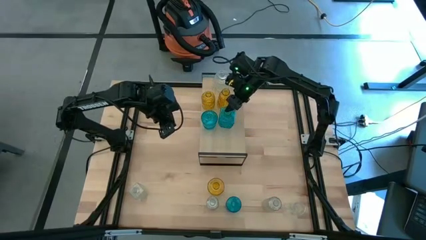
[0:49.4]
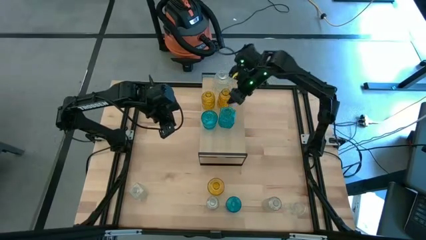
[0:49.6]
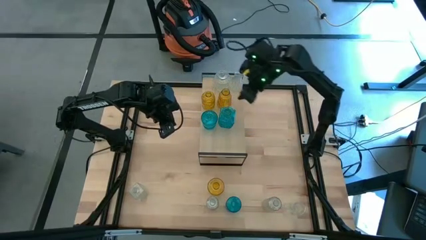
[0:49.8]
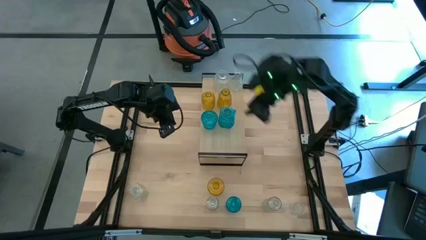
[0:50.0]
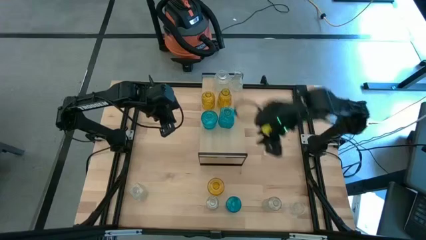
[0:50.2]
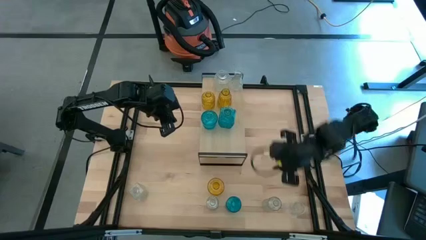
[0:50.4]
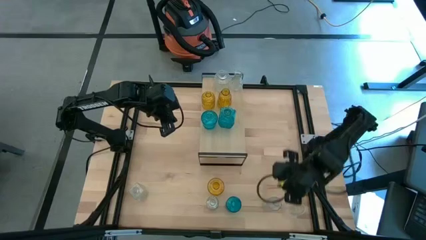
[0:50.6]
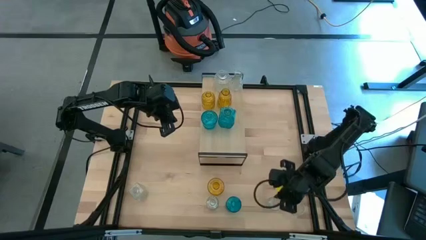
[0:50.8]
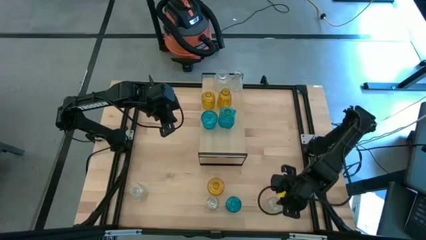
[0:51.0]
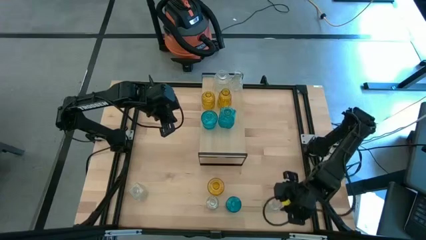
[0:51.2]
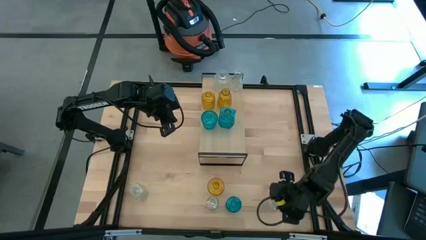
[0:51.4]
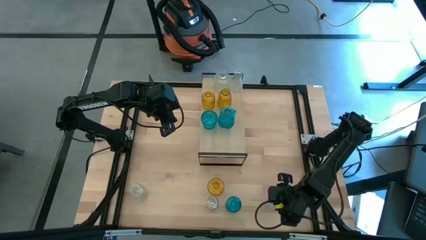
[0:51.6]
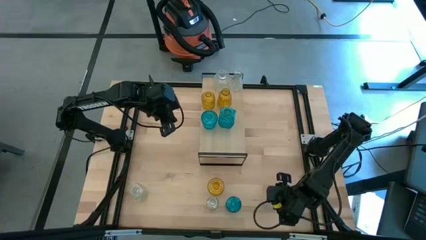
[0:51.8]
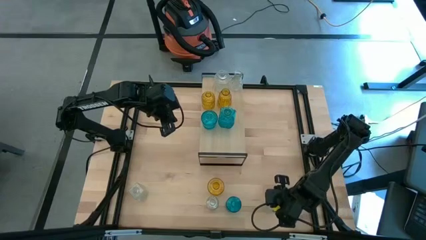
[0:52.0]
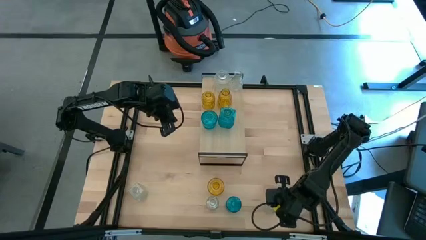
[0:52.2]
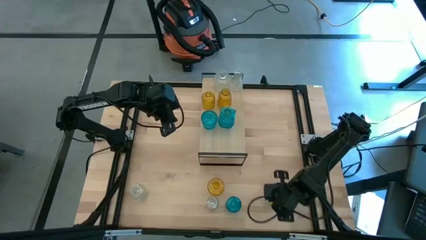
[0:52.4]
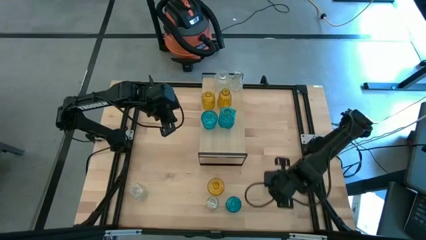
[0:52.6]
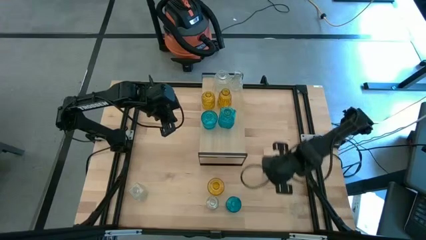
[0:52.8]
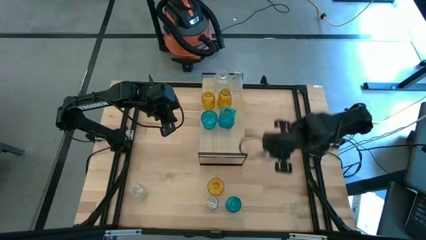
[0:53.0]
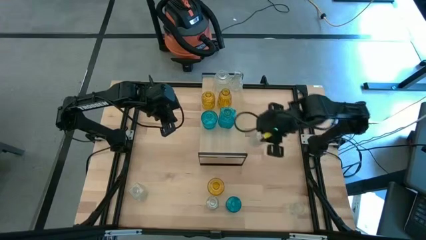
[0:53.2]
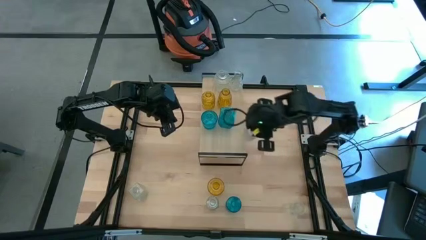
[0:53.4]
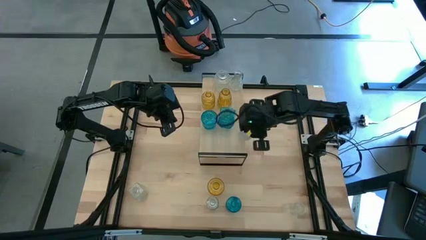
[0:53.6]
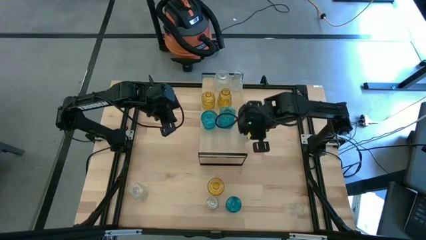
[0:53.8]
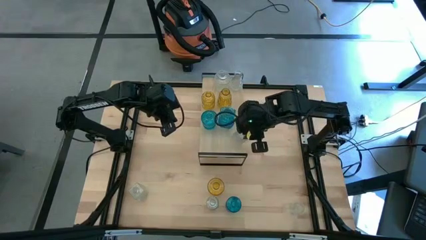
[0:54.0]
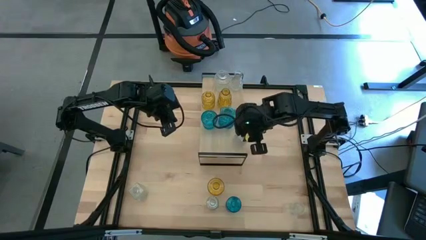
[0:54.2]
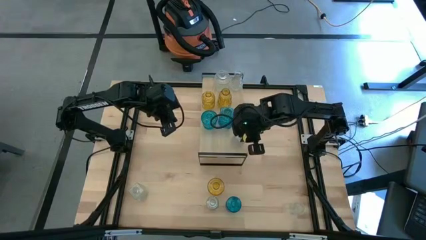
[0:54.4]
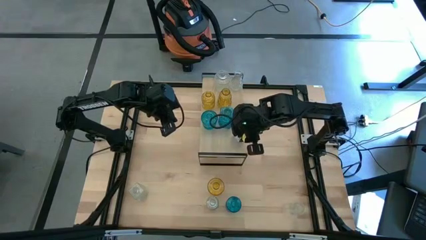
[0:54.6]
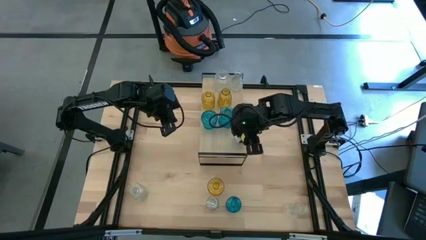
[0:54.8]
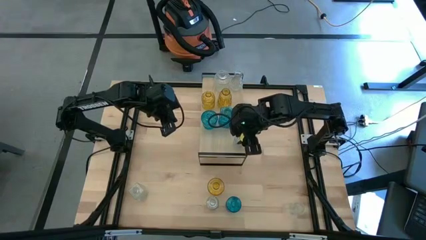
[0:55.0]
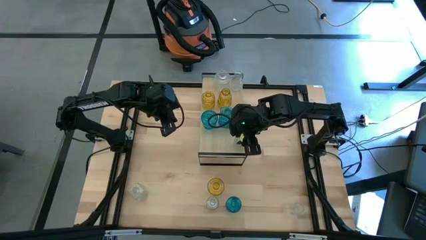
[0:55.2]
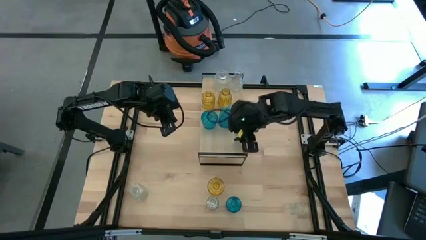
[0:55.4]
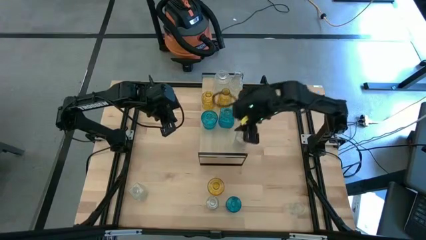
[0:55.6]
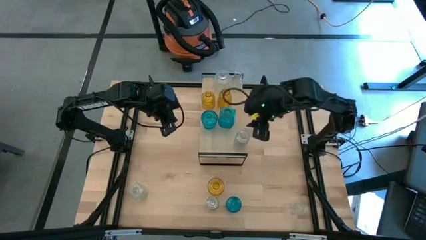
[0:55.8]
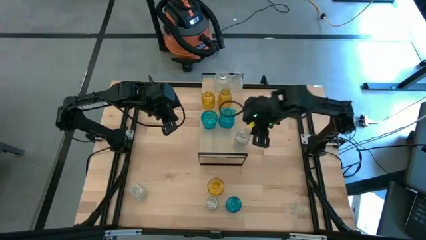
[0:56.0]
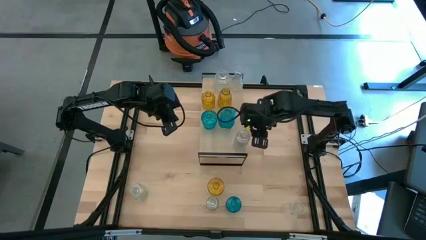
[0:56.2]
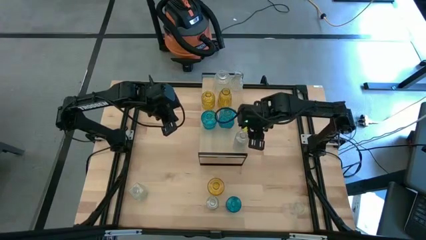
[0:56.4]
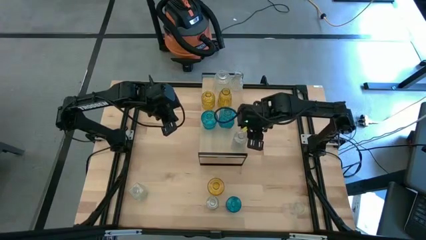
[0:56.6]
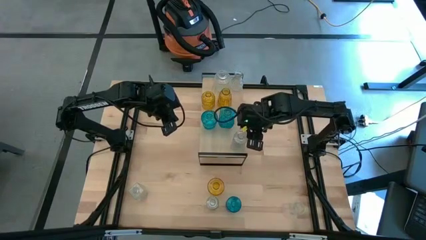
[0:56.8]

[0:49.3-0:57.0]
Task: sort vases onto shelf
Put the transparent vase on the shelf

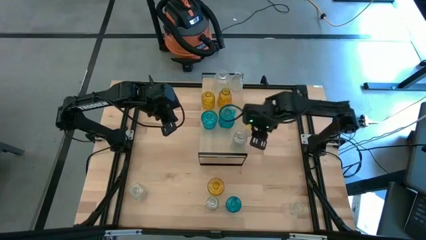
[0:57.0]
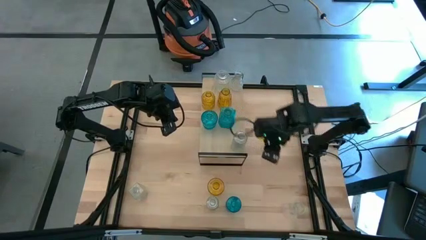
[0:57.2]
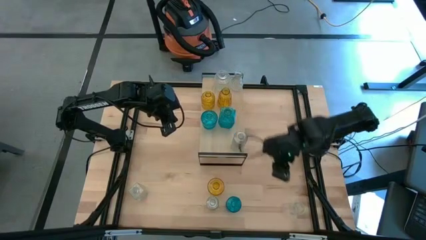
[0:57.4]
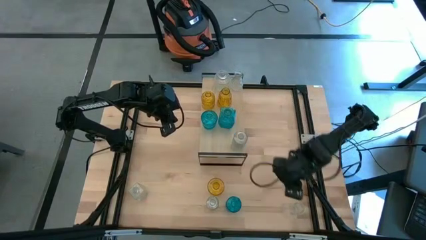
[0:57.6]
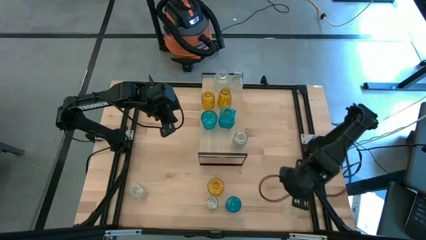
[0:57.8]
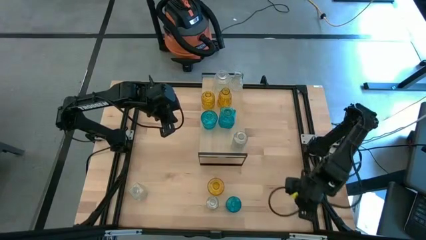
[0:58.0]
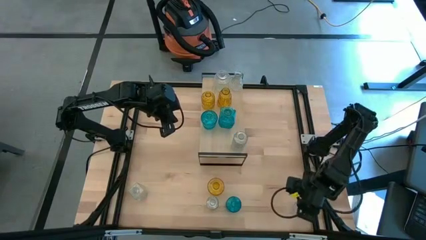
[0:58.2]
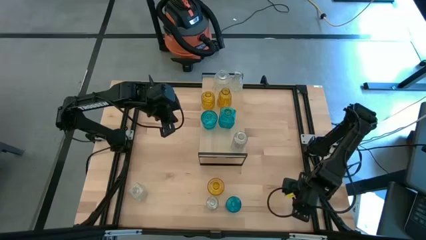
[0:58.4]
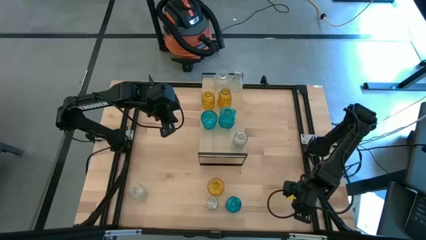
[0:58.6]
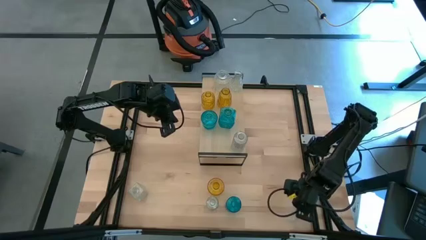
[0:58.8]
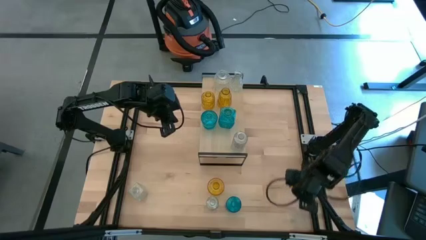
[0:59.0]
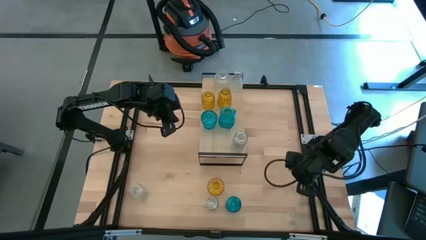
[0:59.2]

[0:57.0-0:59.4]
Put the transparent vase on the shelf aligned with the other transparent vases

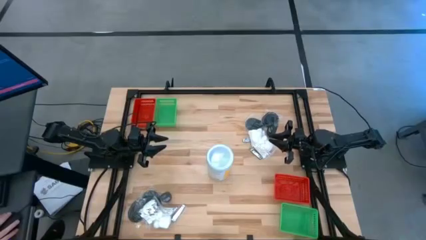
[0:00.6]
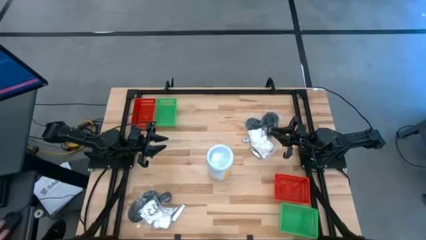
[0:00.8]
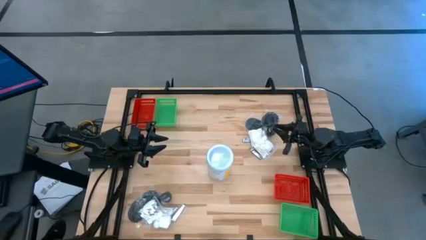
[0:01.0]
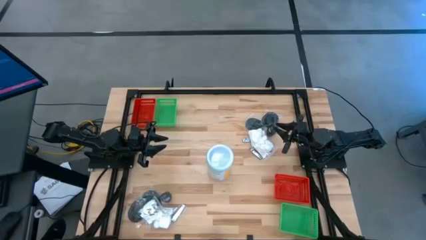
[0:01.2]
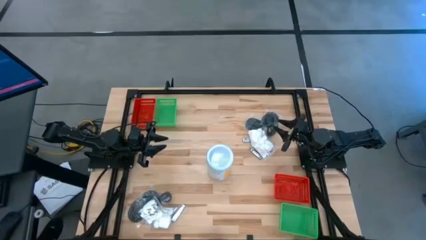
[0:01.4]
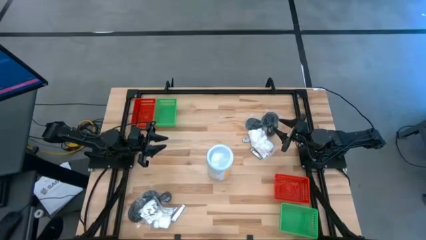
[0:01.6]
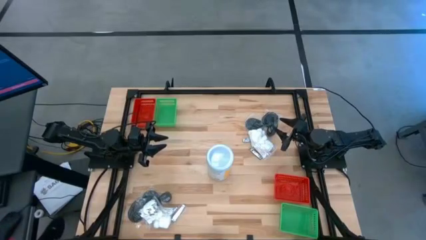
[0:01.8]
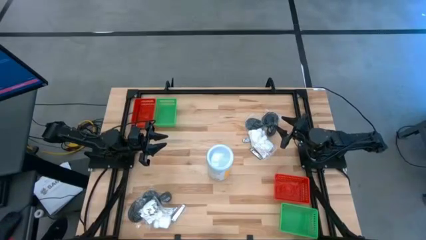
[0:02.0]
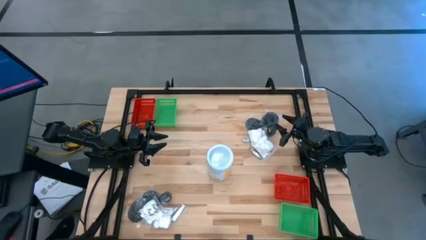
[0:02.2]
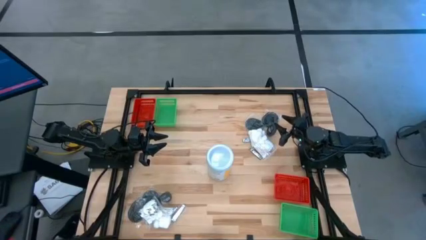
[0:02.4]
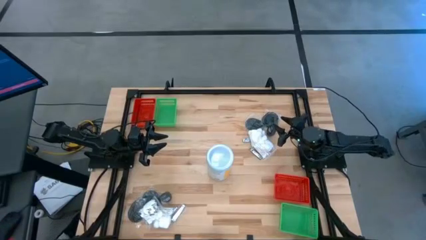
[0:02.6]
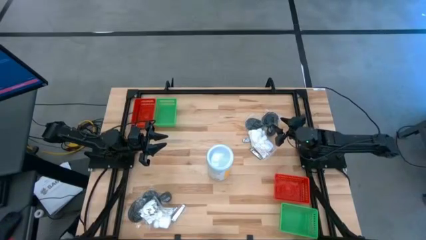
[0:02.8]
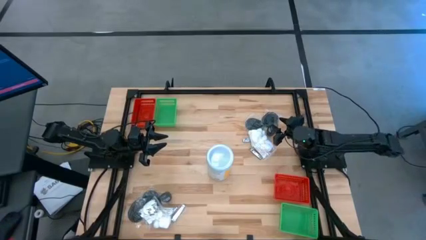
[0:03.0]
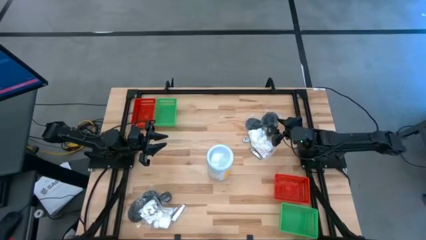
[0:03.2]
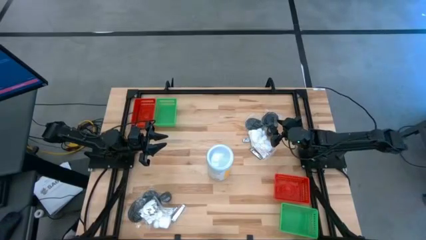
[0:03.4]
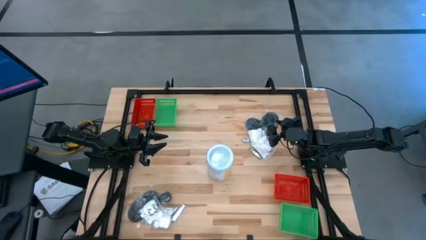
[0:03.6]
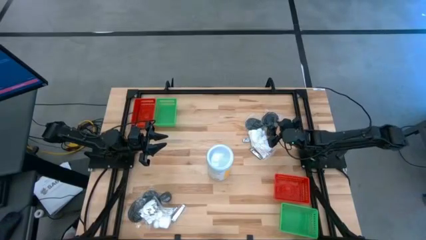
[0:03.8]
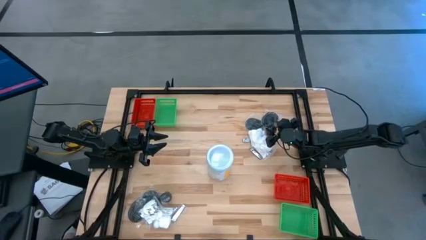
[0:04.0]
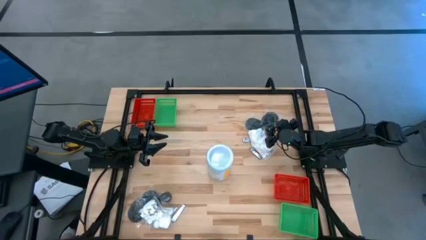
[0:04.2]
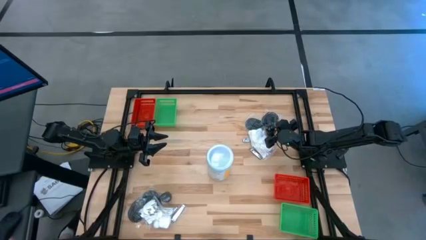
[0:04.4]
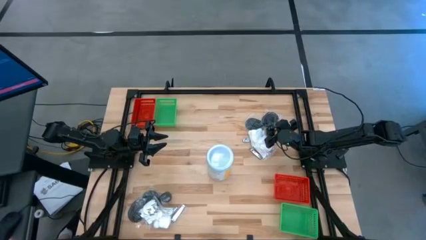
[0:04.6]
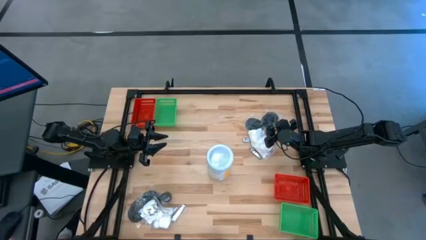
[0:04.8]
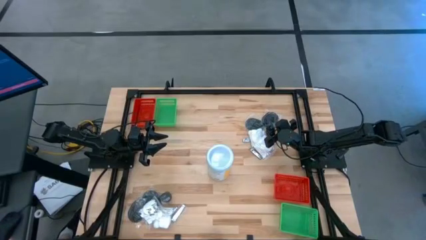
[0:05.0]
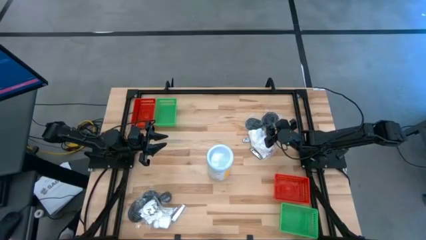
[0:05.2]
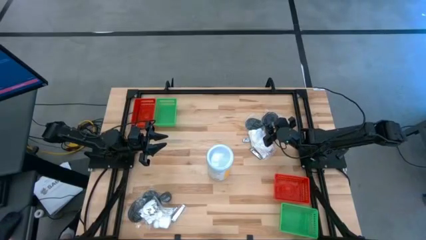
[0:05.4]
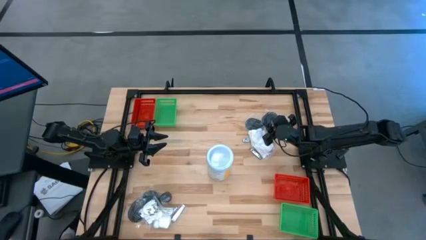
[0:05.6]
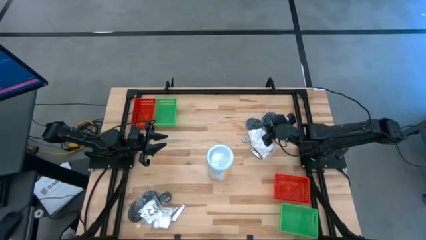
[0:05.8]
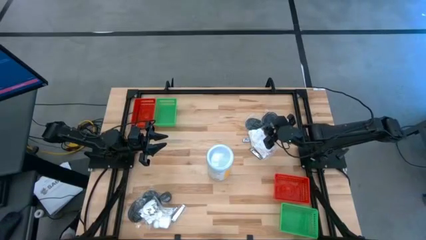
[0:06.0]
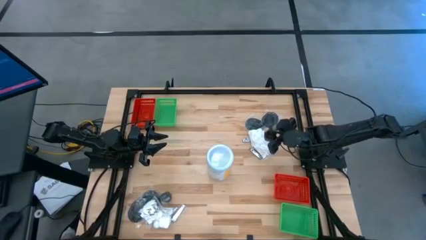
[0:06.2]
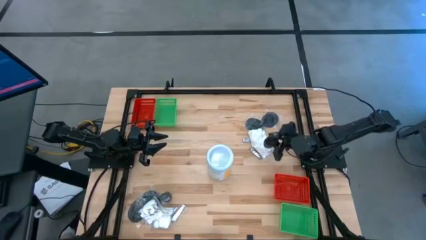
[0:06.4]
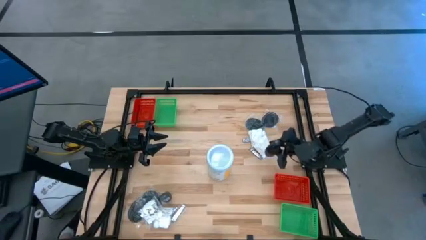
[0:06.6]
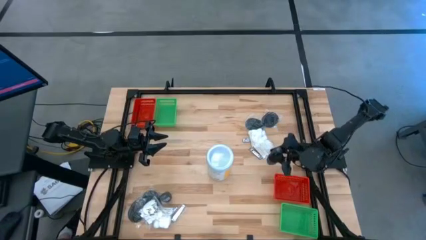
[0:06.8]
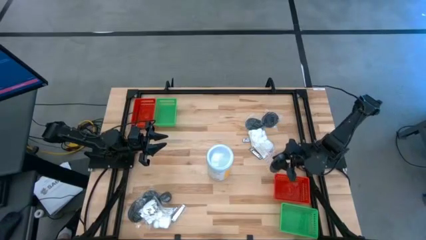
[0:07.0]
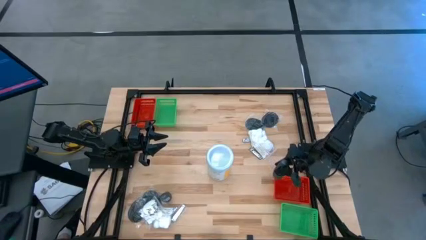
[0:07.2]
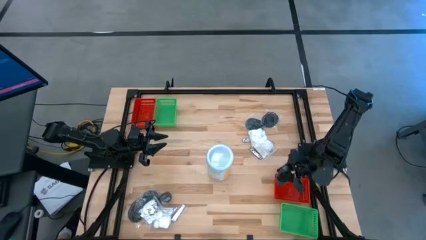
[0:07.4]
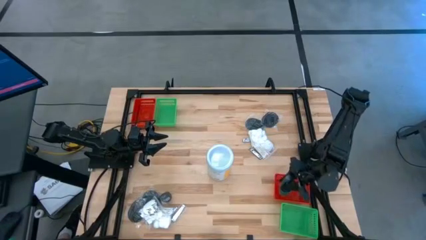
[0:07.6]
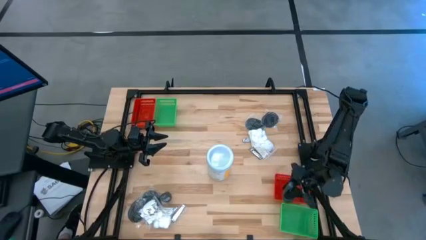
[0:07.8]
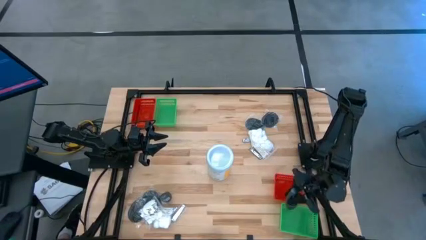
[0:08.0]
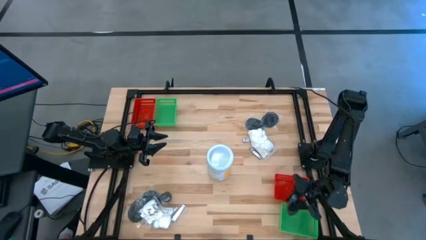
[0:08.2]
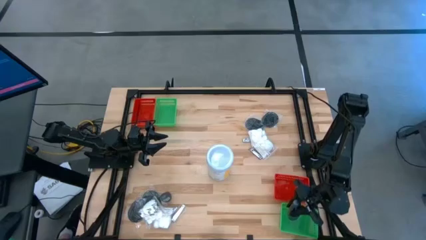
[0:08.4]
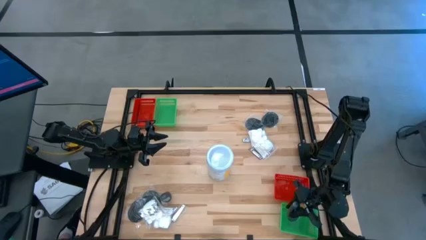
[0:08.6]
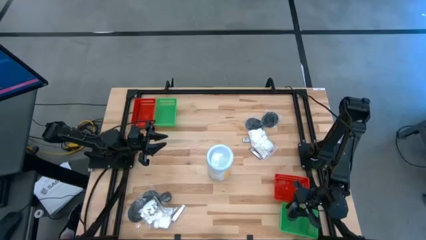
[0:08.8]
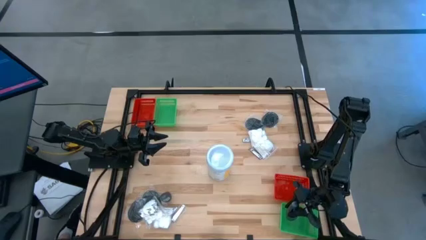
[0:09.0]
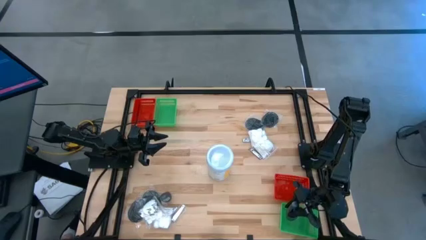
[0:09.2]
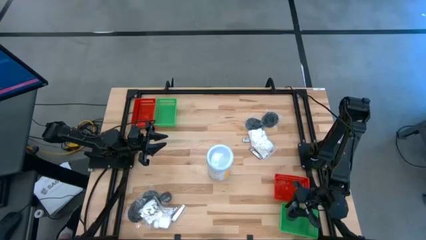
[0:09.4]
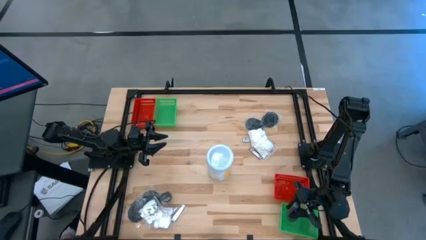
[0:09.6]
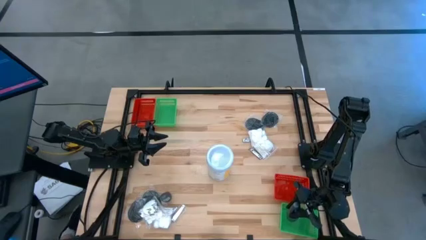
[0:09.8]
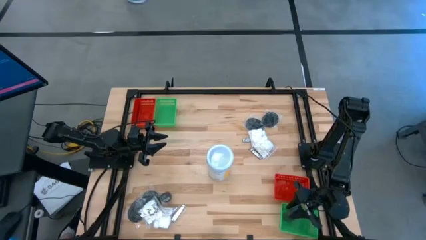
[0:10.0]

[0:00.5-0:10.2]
Task: Pick & Place Travel size toiletries
Put the gray deodorant bottle into the bottom green basket
